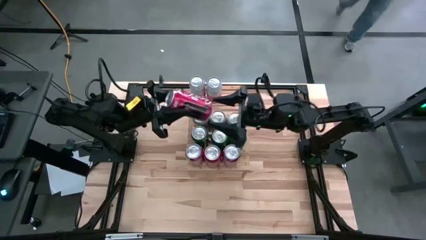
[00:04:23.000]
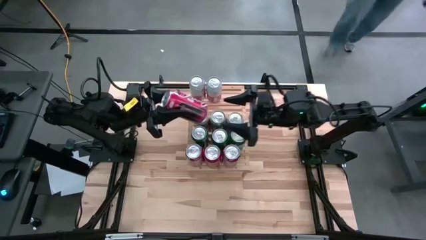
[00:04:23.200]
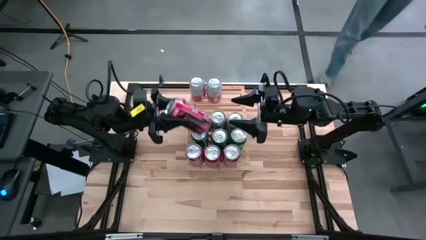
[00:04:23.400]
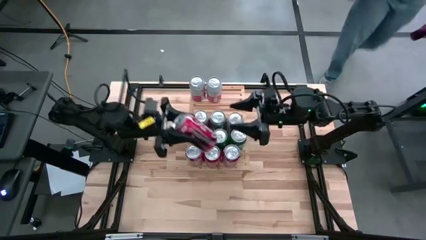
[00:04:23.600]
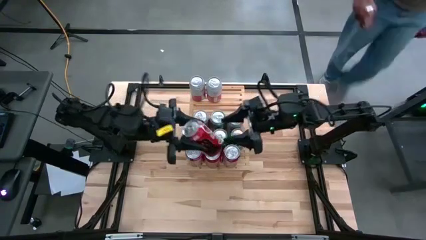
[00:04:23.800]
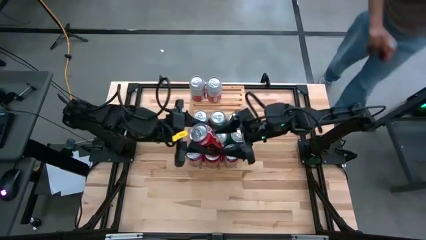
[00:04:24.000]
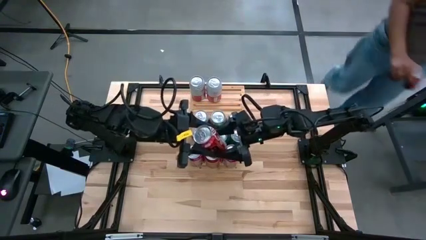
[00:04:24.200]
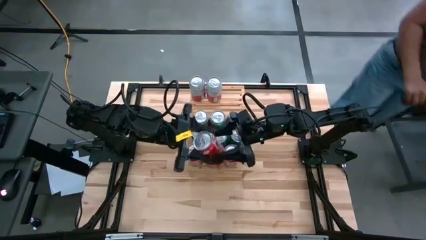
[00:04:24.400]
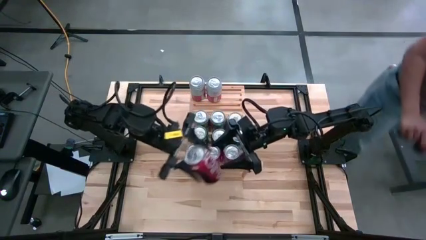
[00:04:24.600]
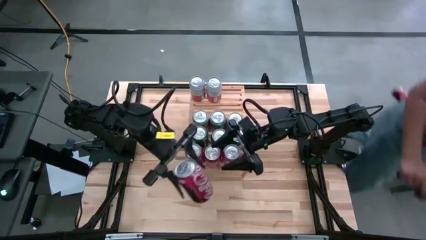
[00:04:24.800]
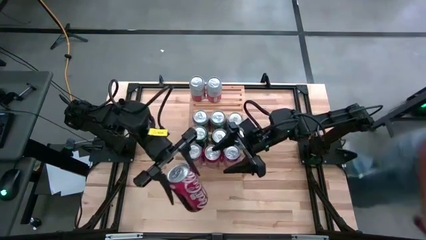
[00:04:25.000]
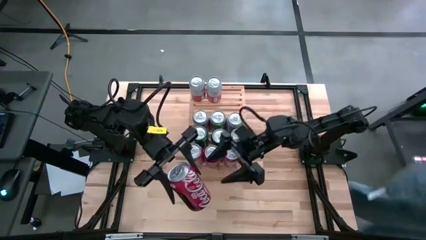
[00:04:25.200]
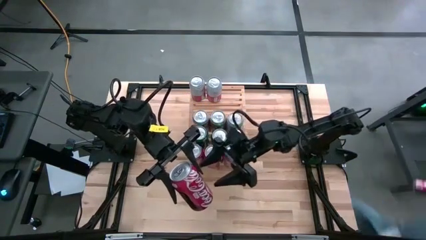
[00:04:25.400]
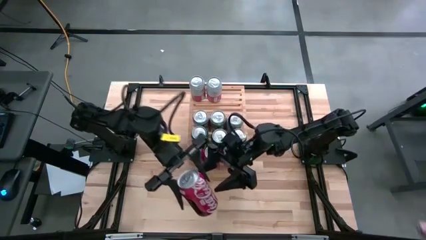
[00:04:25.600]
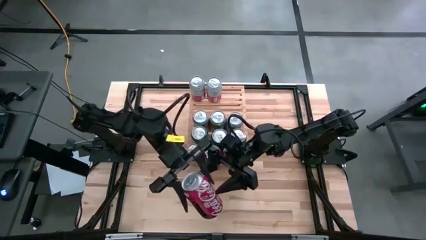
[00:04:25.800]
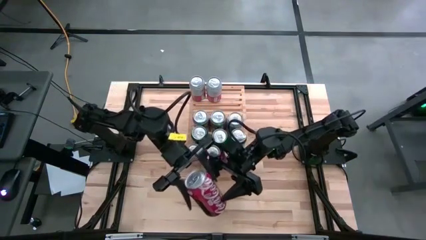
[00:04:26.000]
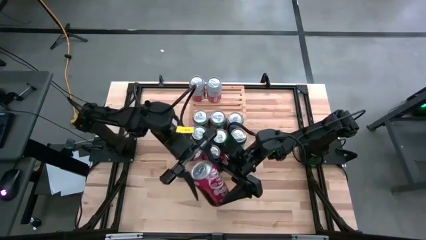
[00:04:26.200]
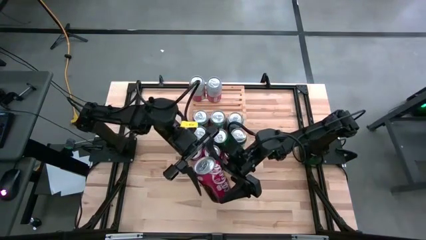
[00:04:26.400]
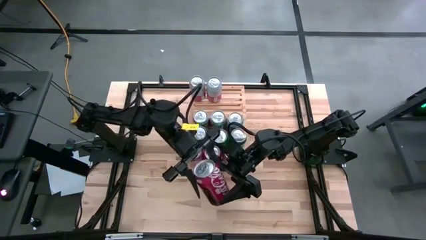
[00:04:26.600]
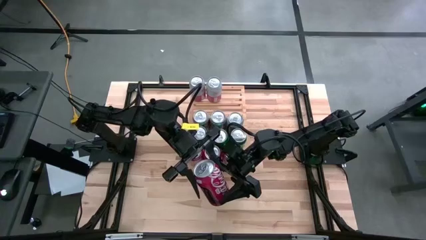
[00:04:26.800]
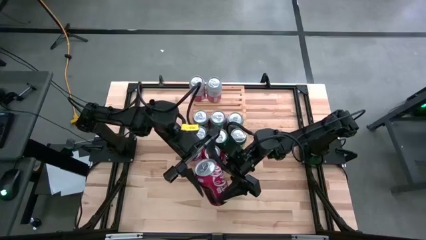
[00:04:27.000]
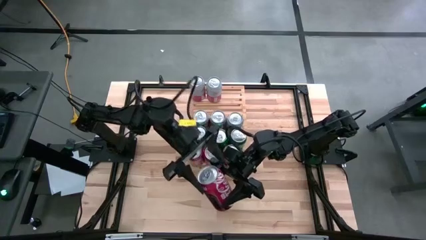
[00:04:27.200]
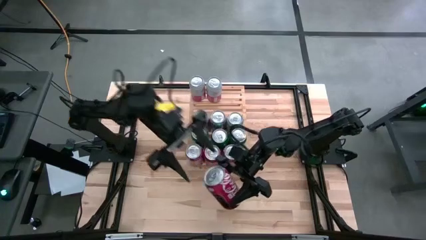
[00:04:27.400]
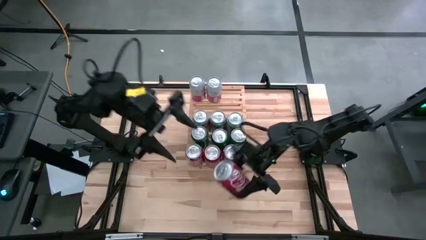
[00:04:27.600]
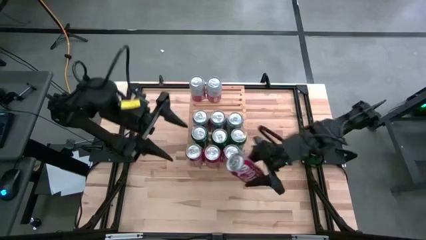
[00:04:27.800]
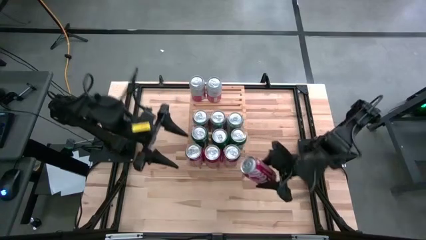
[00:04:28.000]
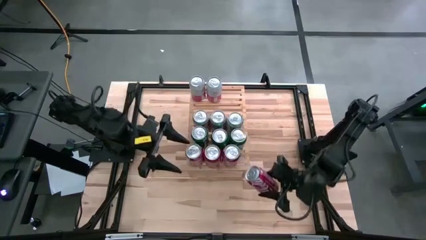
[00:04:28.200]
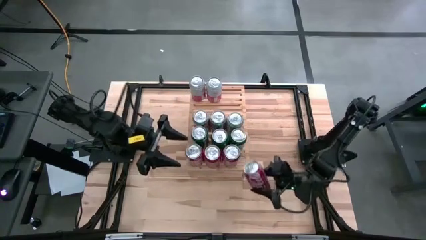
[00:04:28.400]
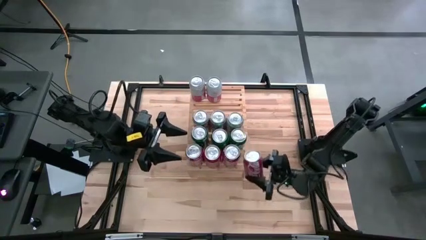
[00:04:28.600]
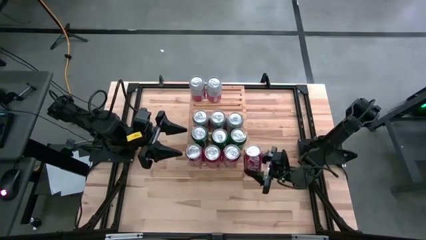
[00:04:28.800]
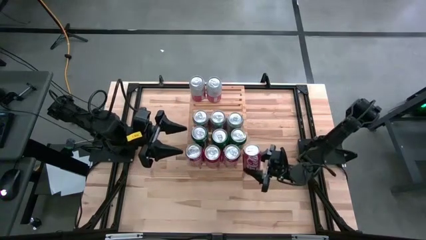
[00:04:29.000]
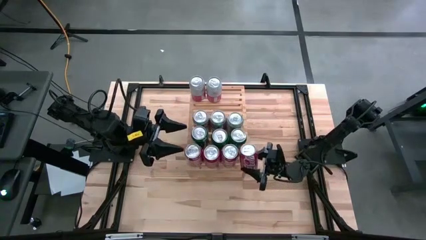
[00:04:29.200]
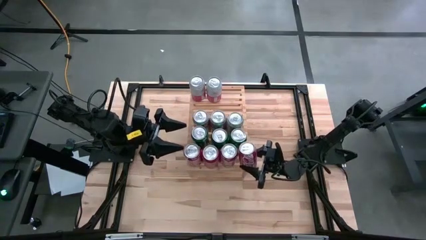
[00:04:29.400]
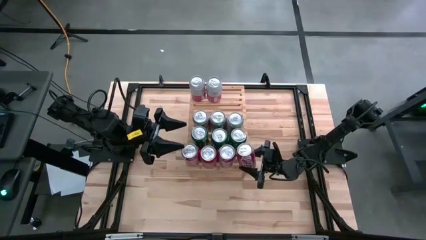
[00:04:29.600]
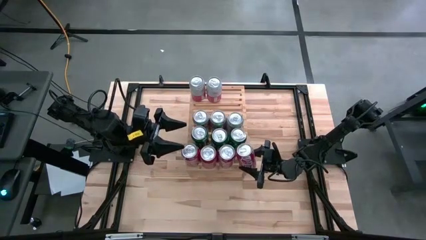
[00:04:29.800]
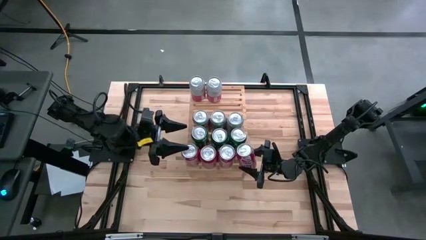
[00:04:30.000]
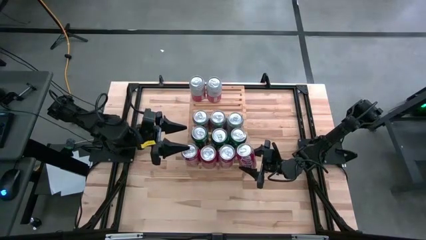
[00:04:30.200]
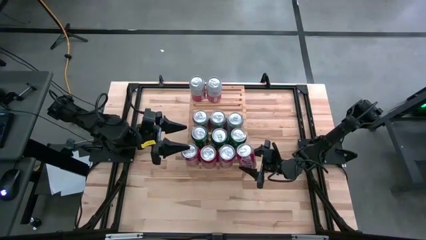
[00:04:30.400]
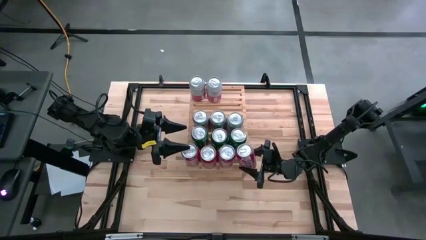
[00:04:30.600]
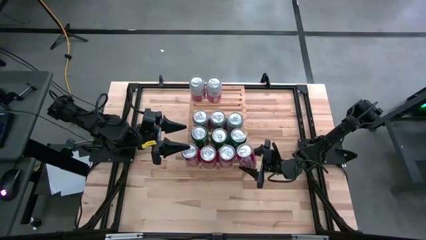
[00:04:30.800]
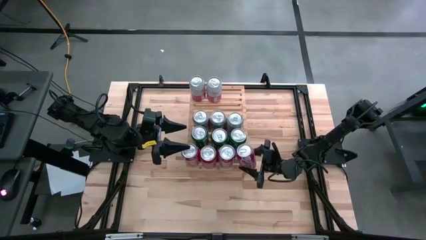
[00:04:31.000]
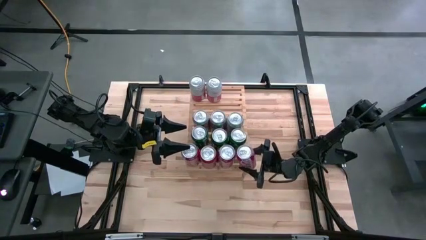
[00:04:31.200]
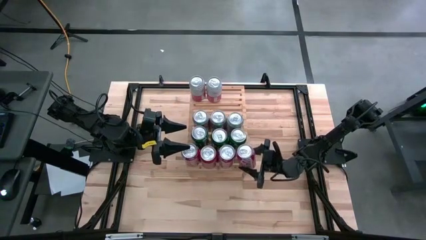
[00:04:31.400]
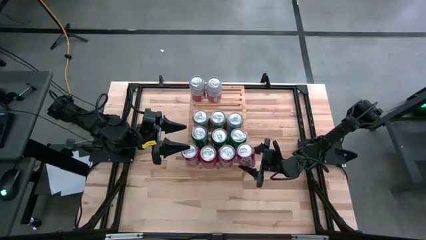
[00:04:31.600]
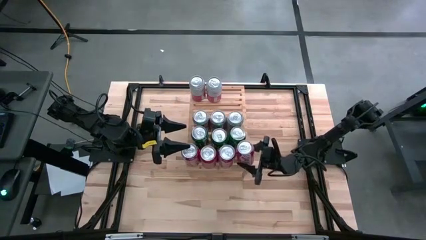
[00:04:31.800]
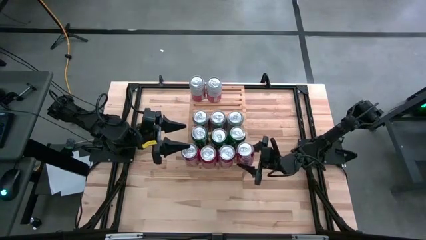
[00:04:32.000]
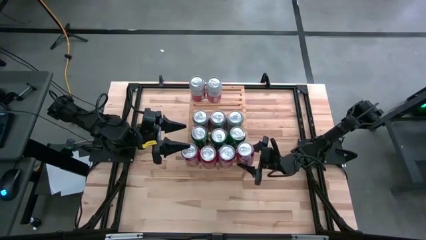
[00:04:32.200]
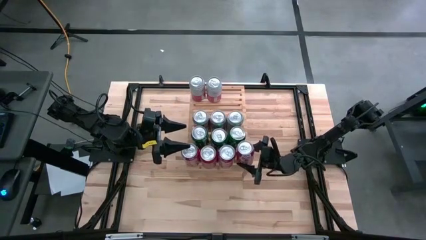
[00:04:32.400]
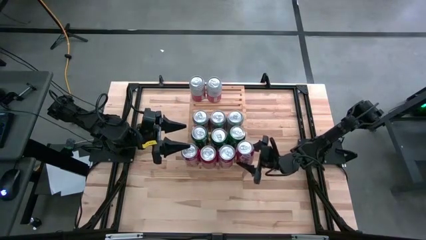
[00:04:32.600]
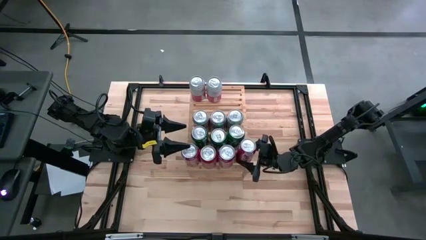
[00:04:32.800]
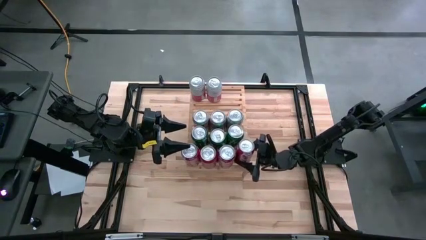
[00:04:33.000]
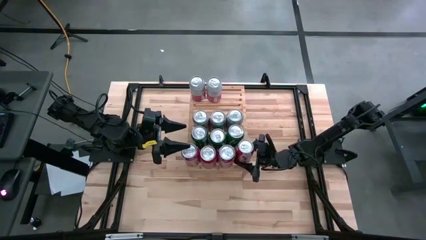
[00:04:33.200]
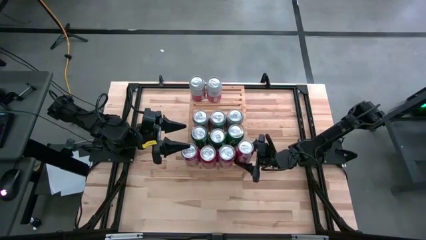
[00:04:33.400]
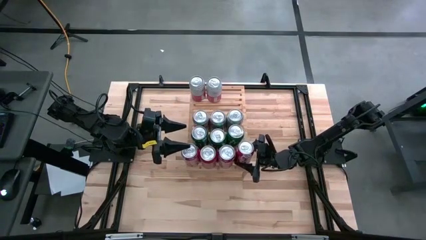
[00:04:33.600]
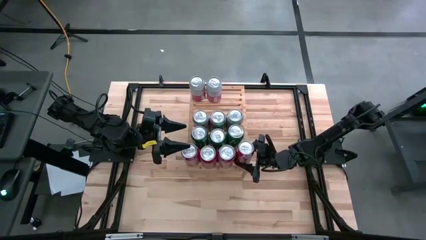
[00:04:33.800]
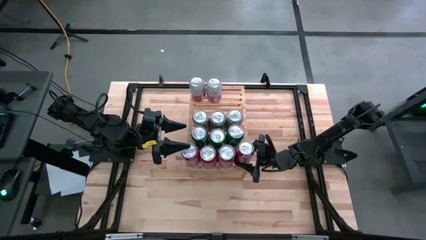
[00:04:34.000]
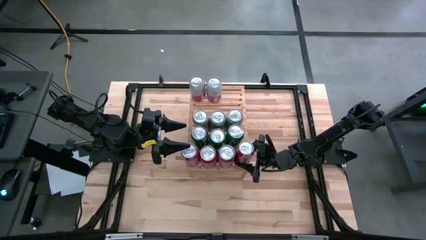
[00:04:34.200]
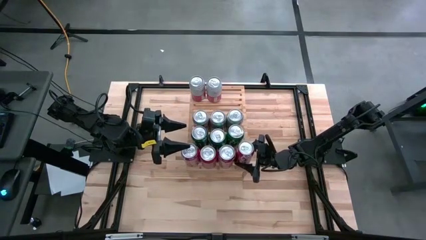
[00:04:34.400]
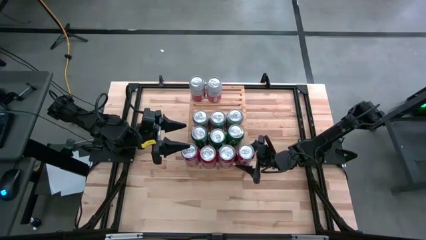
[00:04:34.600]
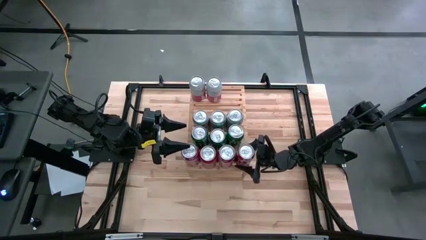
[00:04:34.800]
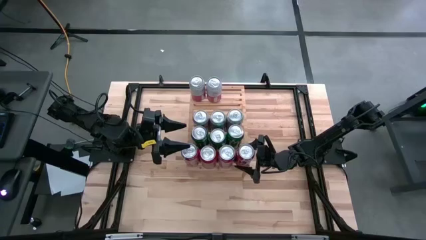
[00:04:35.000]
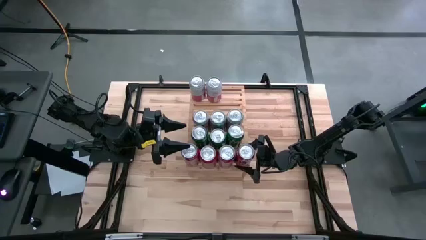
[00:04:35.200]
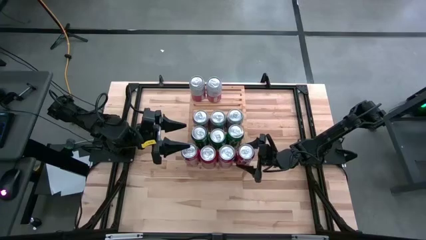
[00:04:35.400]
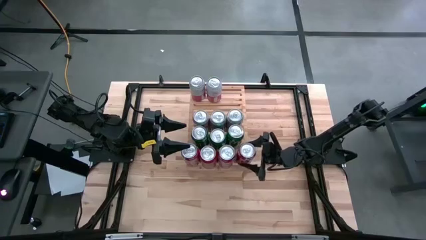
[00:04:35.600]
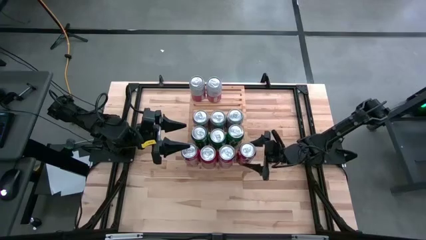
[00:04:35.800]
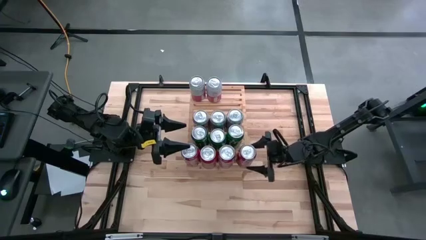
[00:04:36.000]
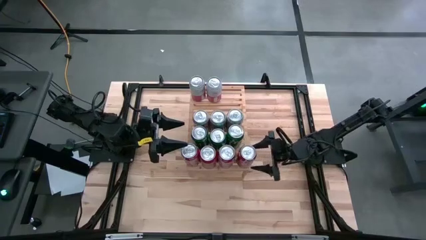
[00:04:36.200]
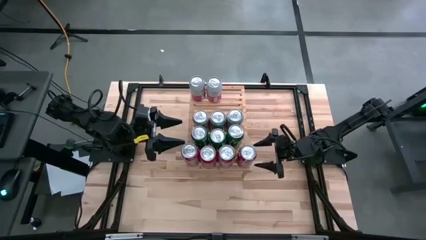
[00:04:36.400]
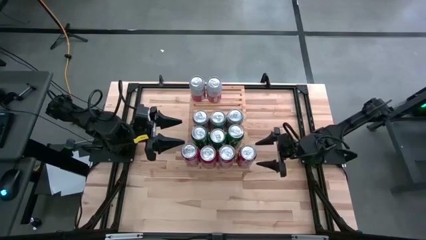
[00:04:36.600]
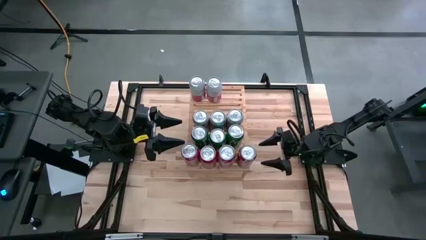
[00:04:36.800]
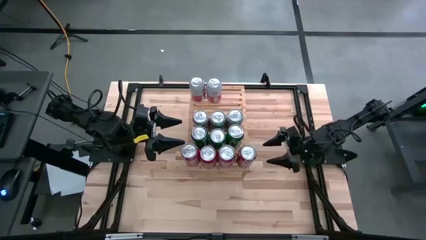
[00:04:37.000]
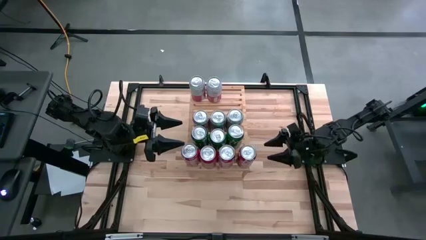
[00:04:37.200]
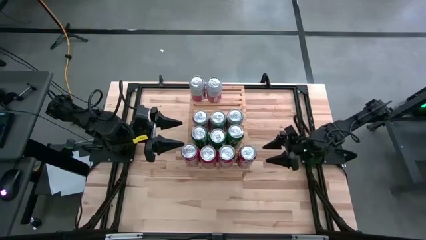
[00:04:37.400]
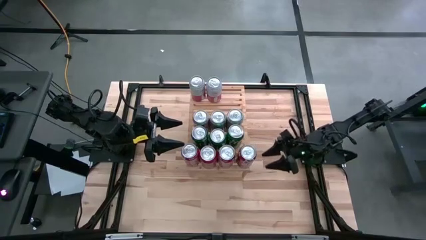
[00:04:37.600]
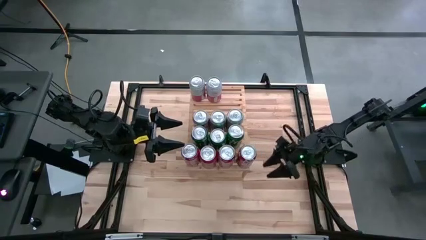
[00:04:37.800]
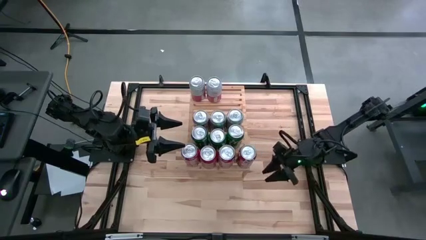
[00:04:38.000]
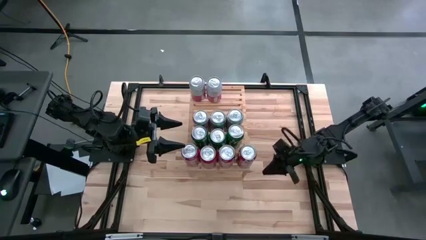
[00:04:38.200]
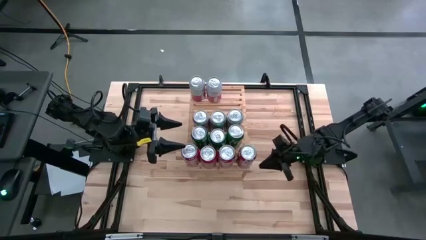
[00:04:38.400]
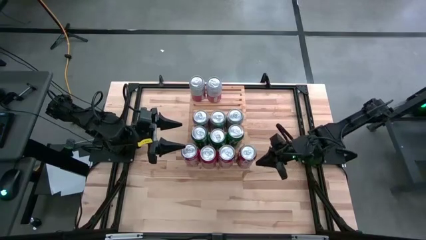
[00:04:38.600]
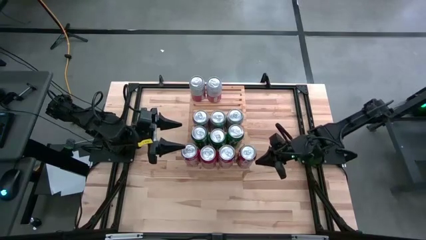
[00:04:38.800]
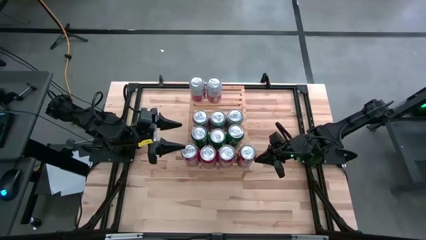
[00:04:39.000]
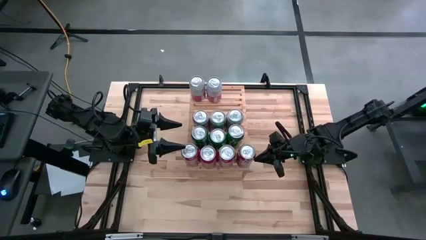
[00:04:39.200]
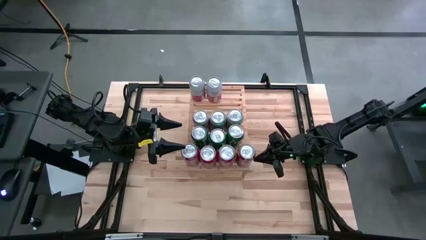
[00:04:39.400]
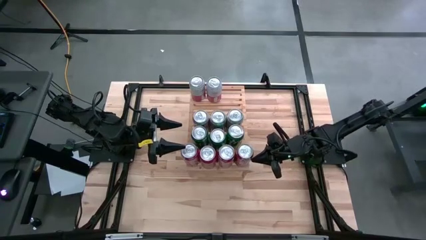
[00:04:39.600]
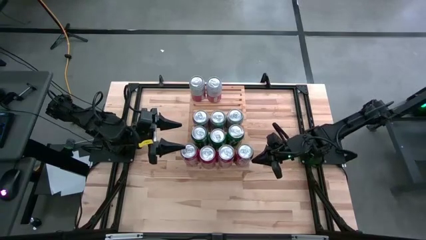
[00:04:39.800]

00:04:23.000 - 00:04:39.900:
Task: Place canned beverage on shelf
Put the red soda can on the shelf aligned with the other red soda cans
